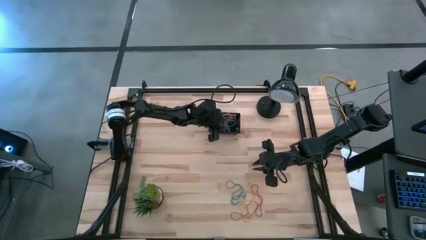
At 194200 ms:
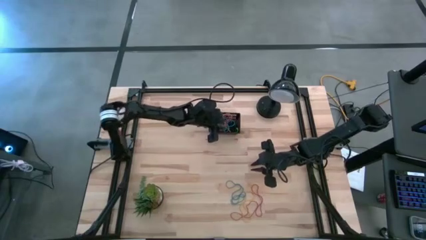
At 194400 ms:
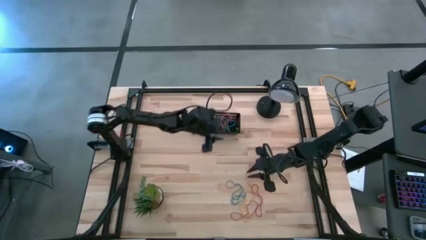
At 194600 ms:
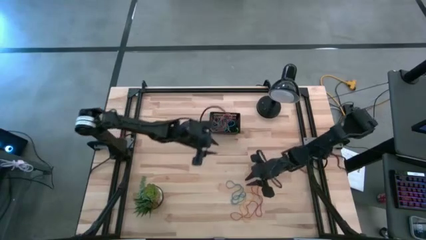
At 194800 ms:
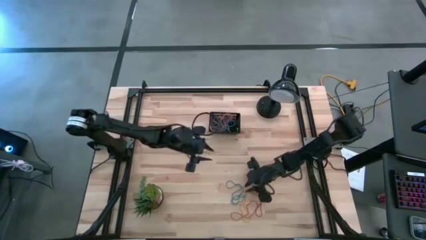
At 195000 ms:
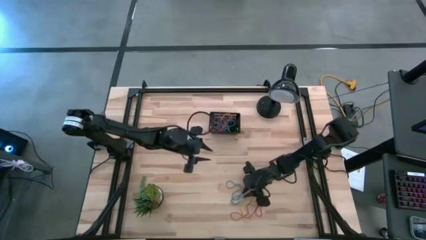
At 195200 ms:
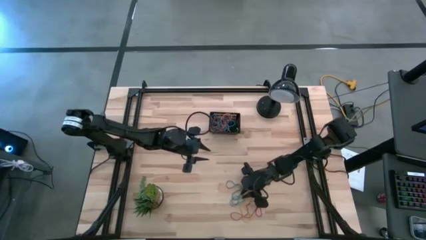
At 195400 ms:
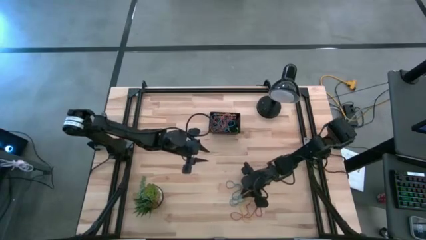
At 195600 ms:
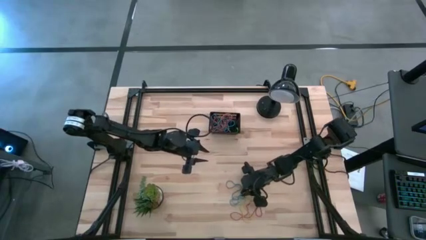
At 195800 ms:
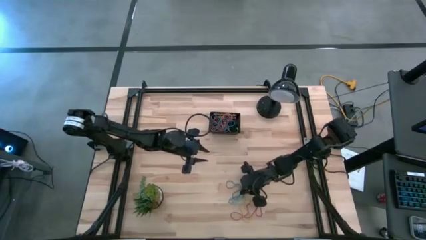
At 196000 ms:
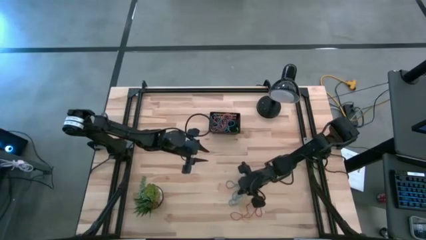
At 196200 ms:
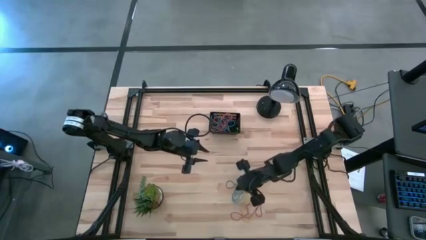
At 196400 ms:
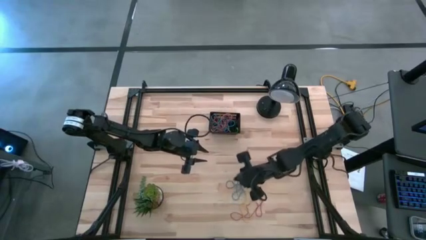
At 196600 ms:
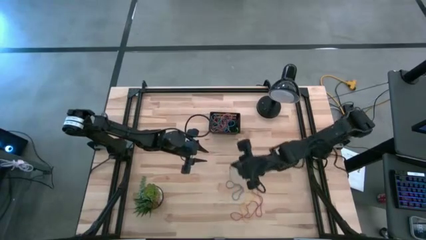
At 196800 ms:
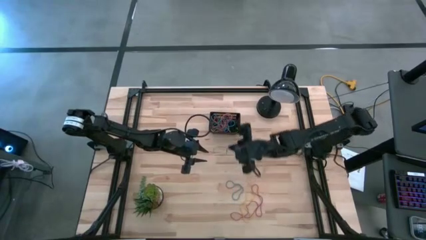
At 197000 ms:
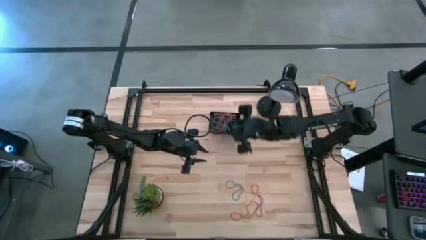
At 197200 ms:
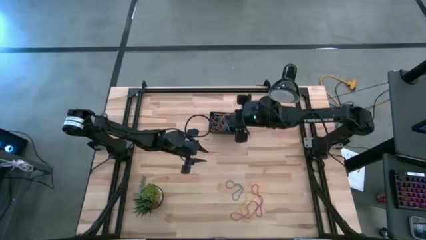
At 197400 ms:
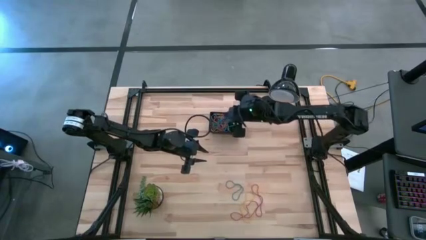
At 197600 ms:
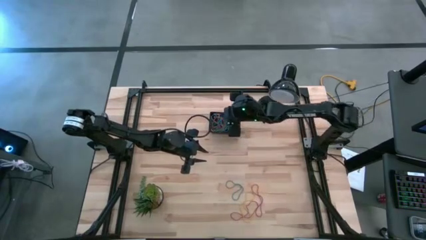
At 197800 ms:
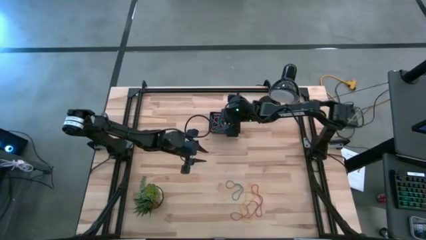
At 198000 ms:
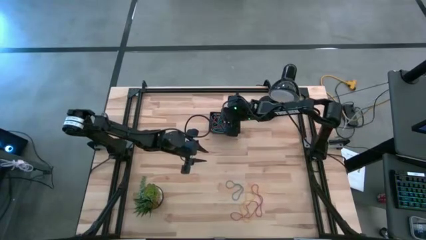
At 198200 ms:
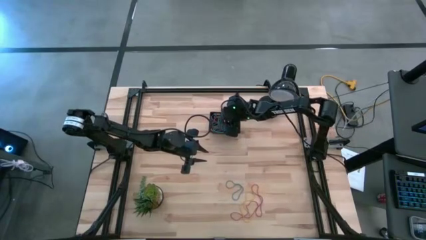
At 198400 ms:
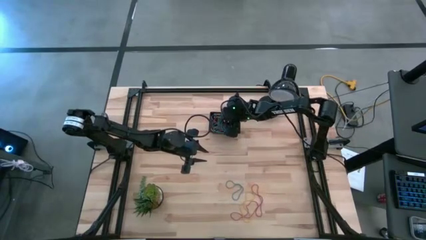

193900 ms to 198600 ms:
Task: Pick and place rubber bands into bin
Put the blue rubber band into the basket

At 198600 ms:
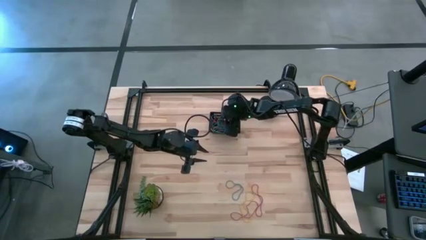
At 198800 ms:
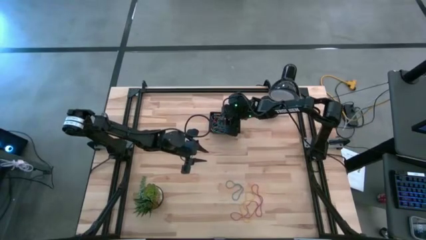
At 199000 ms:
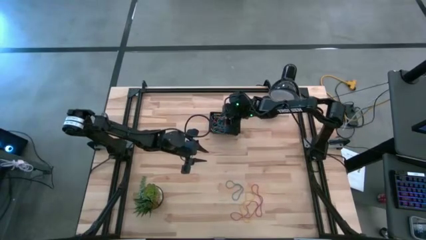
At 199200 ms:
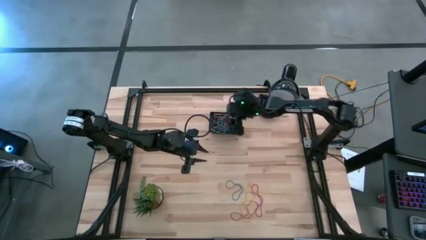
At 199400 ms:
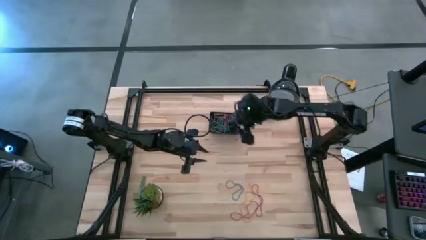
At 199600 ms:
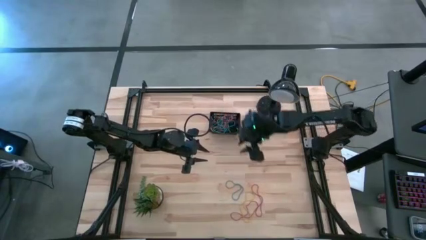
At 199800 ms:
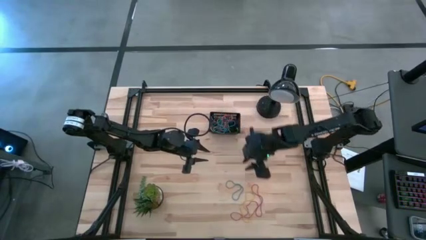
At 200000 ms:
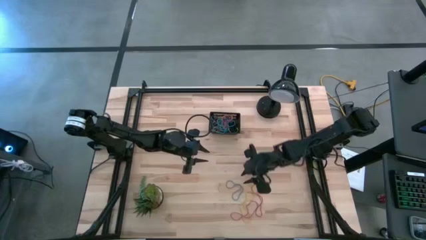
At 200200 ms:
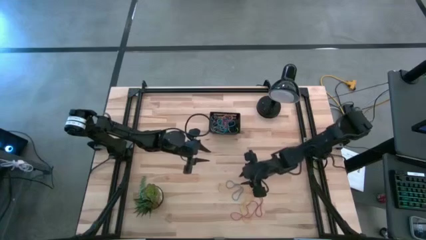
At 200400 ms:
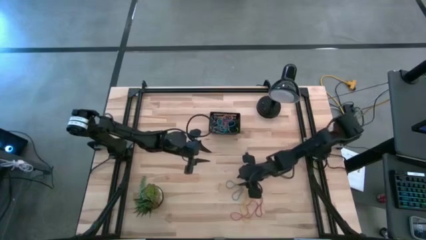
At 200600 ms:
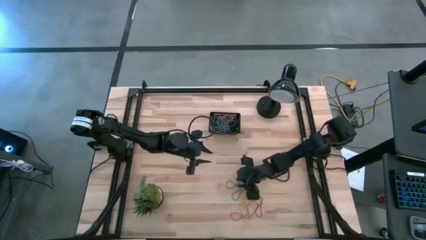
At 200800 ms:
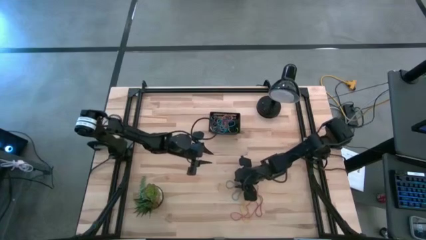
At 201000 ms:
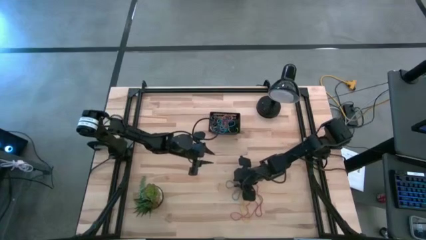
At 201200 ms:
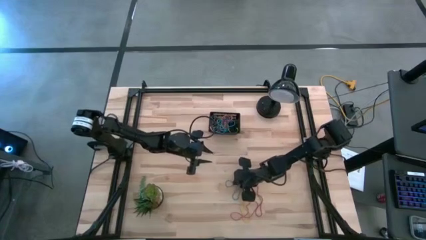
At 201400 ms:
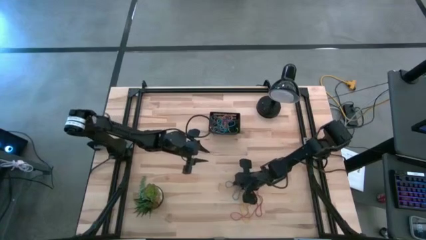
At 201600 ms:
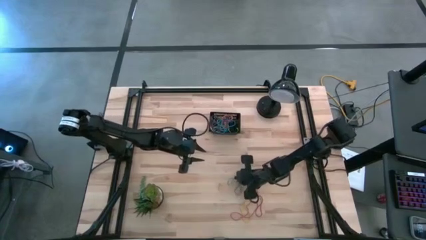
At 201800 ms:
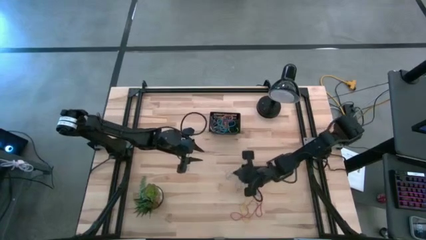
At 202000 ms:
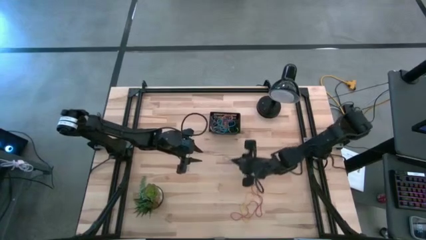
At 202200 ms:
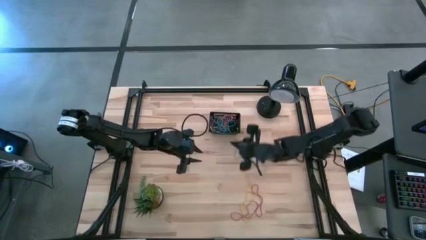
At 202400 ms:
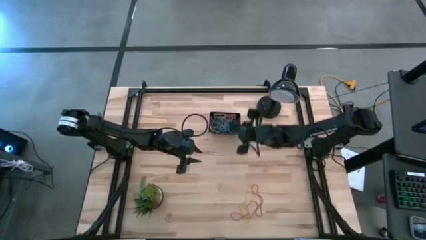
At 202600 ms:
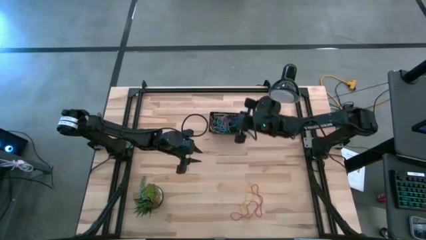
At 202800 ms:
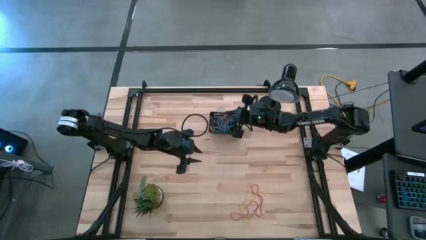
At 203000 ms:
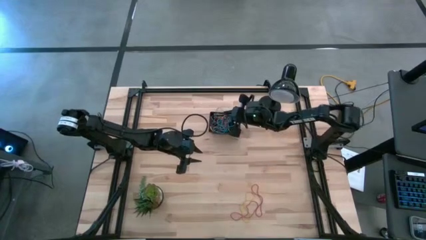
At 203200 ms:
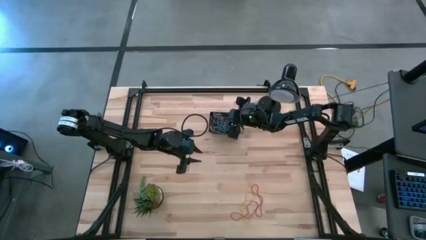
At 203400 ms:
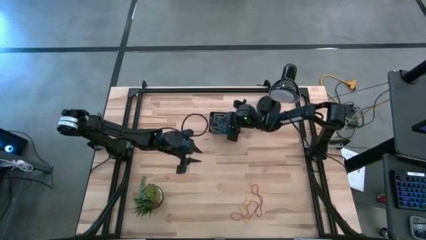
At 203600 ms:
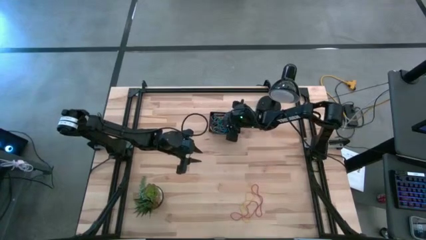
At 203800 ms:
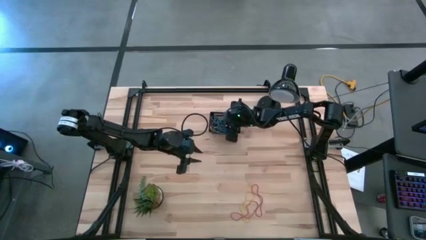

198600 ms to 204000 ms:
Put the blue rubber band into the basket

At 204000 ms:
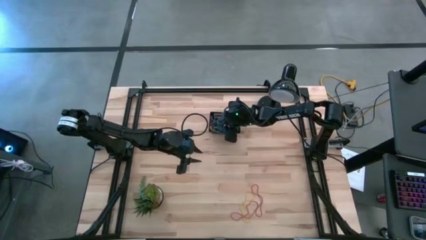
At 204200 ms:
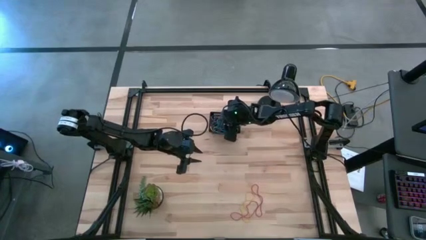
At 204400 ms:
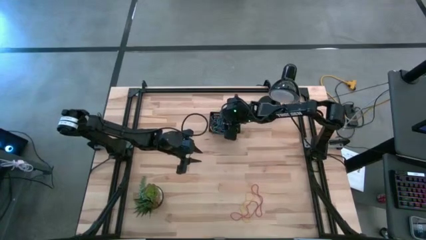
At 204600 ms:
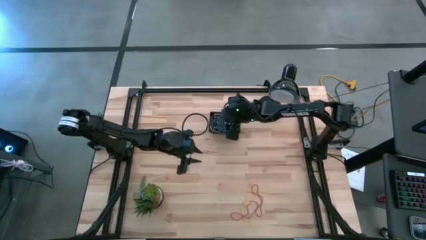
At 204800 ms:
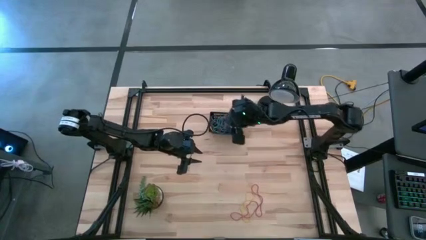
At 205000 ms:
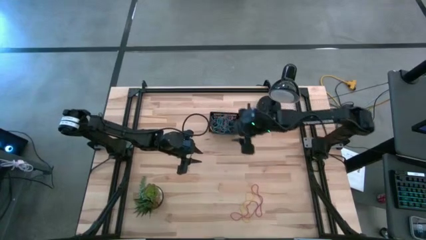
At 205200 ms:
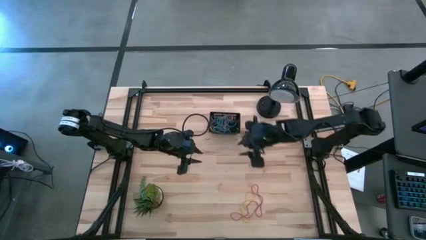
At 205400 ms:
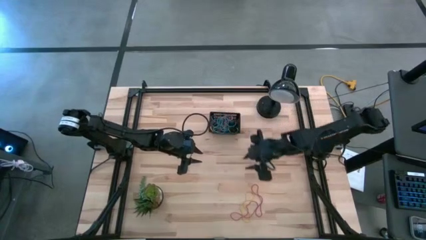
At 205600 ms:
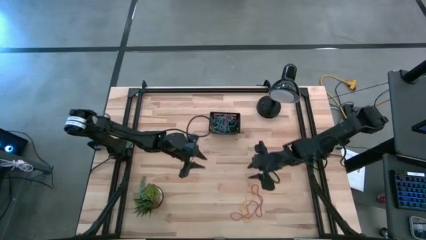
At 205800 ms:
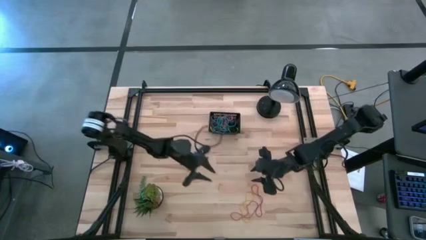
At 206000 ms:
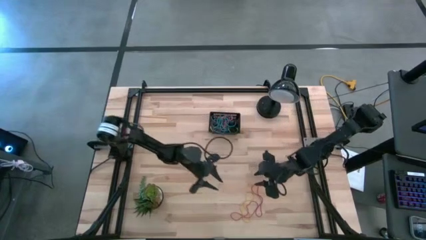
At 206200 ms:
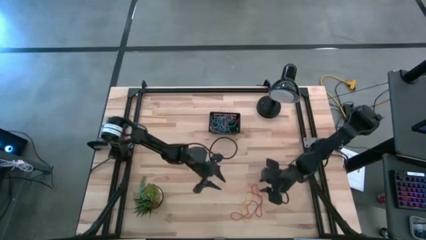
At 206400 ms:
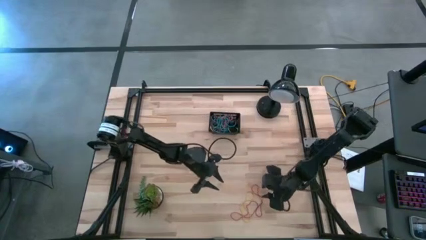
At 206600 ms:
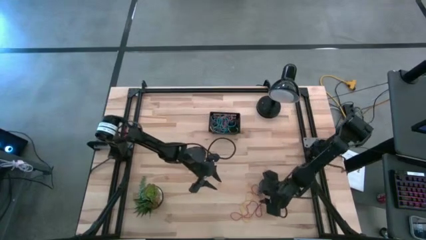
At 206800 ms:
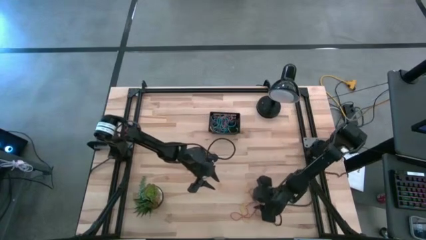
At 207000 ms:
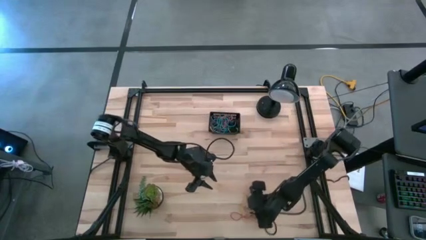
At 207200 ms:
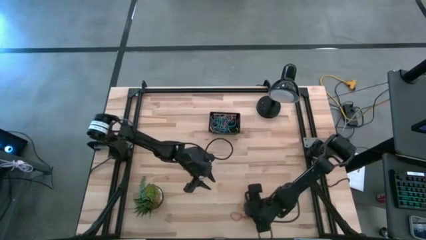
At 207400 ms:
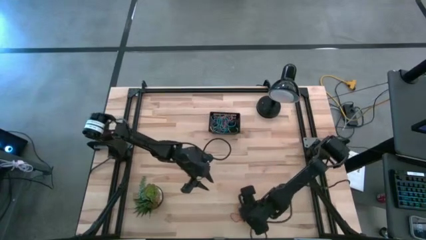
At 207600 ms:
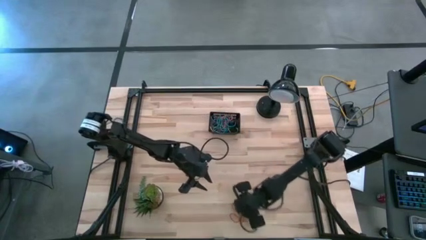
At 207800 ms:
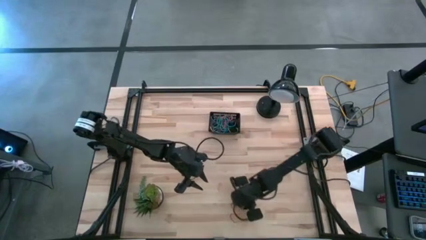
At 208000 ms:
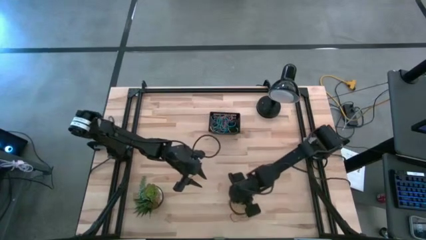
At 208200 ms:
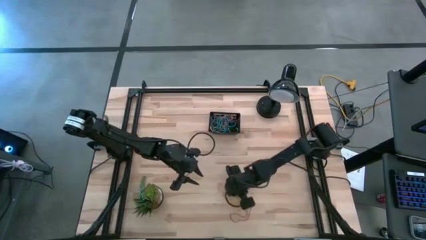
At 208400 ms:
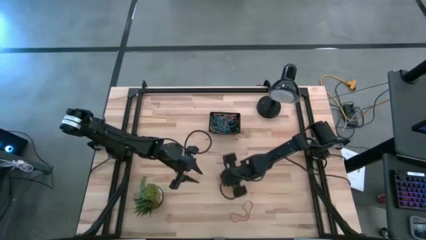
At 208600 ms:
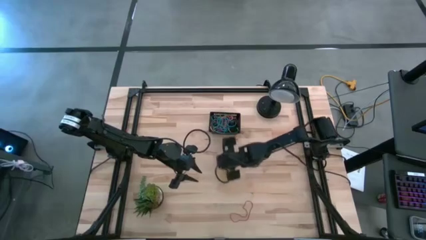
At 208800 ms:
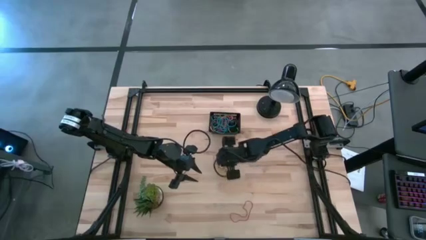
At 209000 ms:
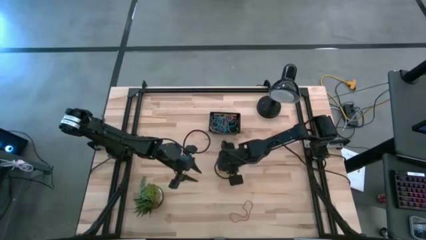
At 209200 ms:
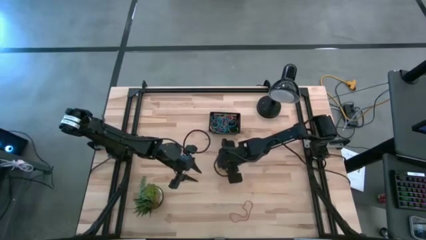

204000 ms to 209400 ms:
Put the yellow rubber band into the basket
